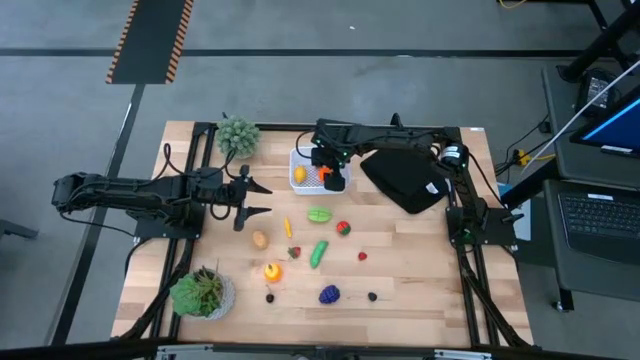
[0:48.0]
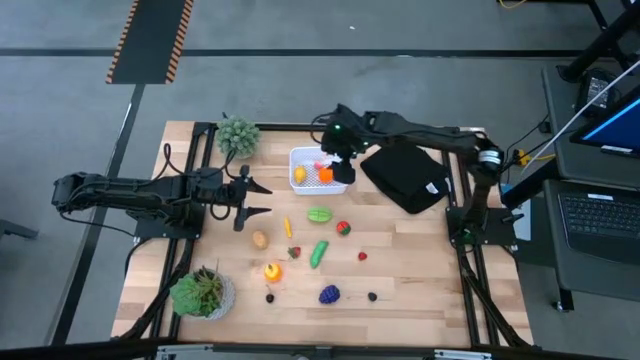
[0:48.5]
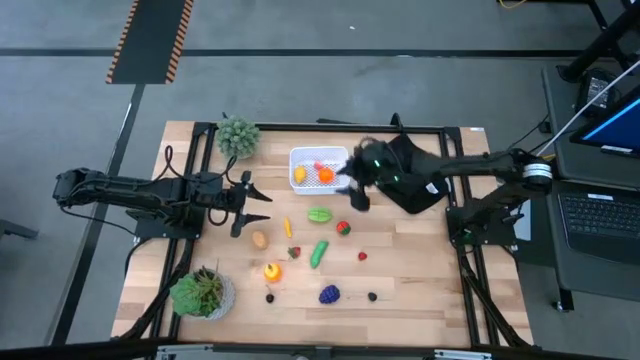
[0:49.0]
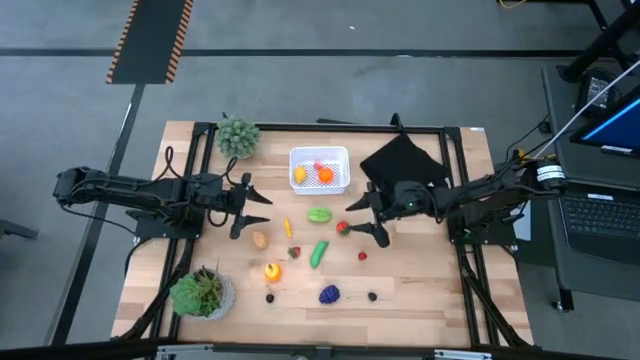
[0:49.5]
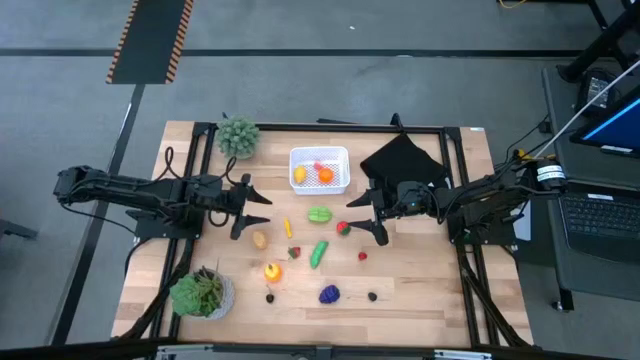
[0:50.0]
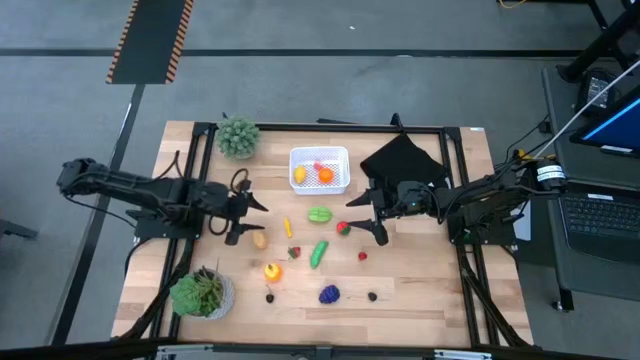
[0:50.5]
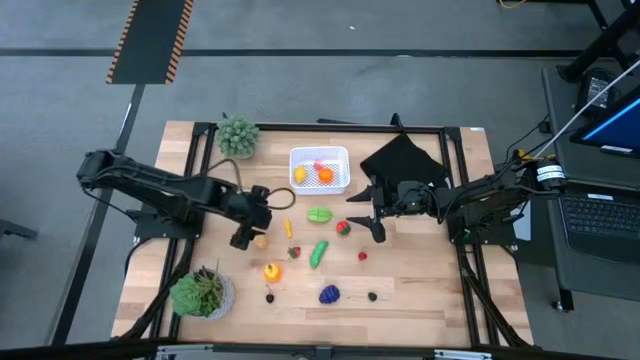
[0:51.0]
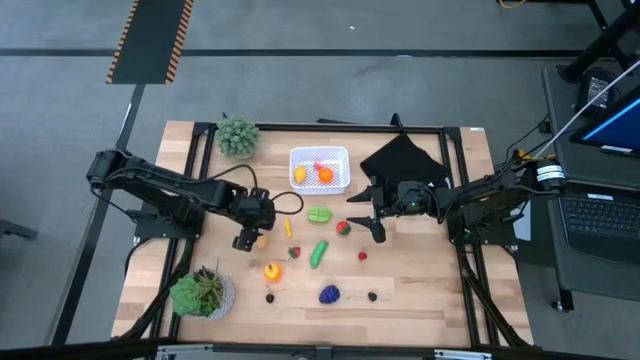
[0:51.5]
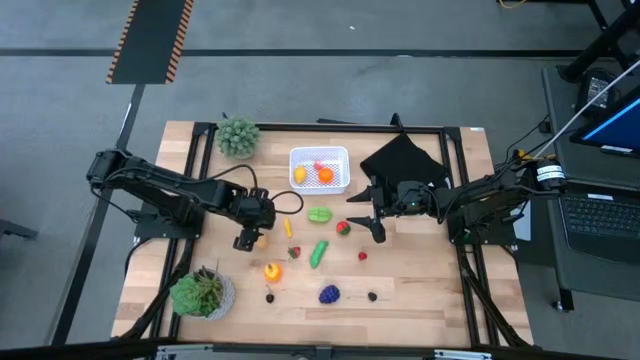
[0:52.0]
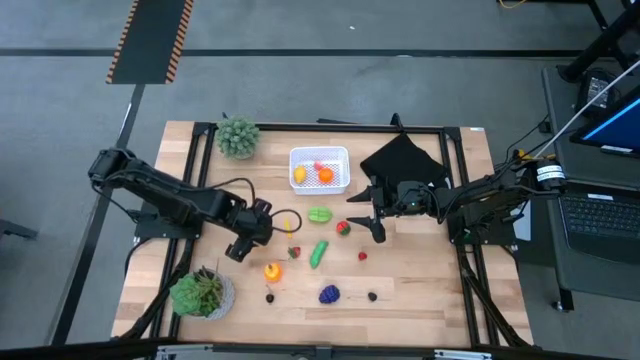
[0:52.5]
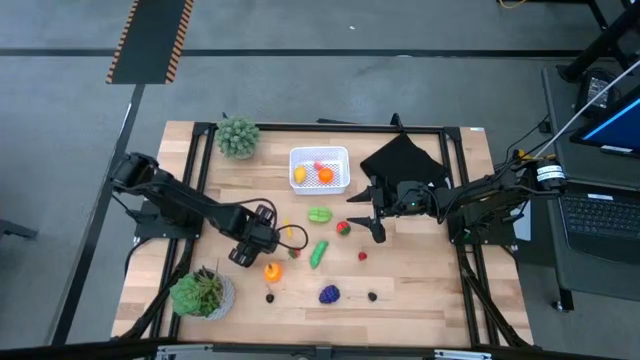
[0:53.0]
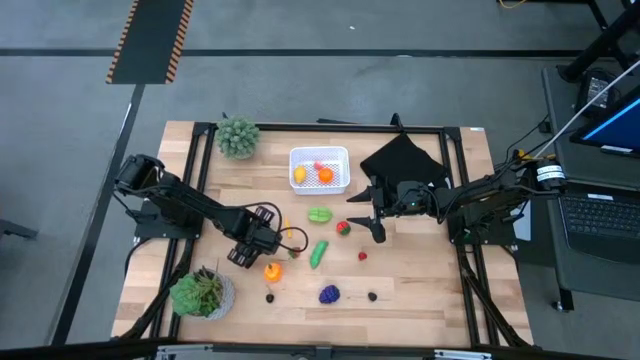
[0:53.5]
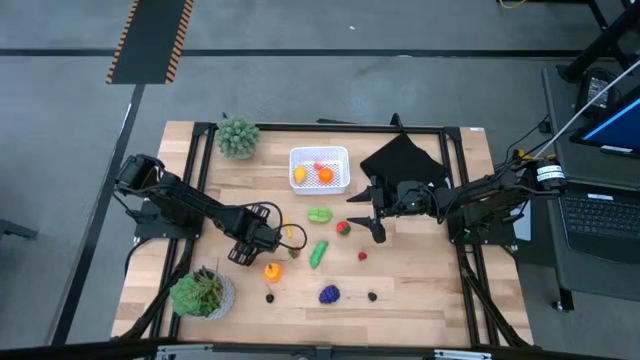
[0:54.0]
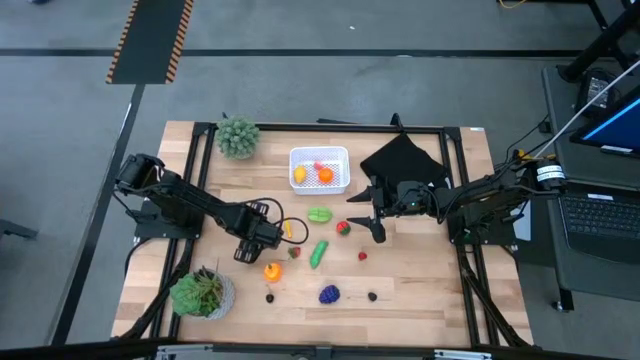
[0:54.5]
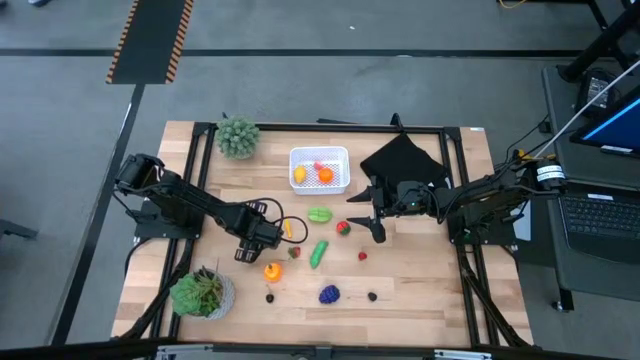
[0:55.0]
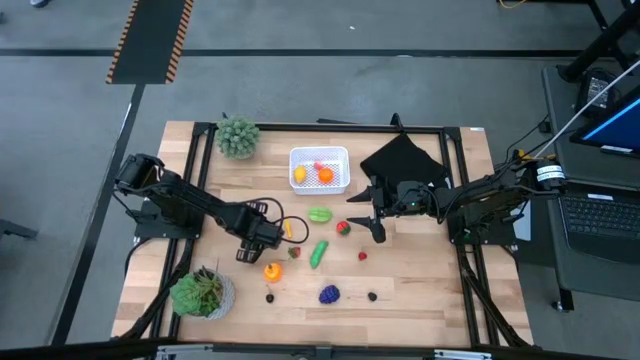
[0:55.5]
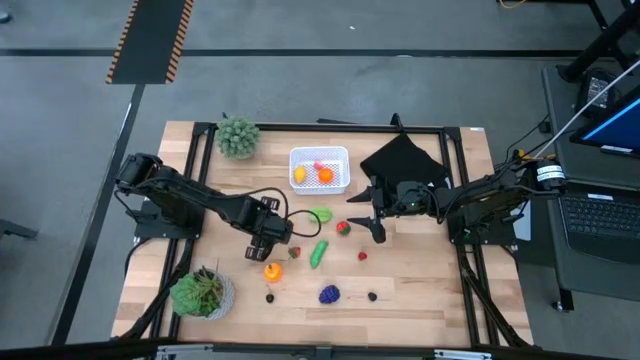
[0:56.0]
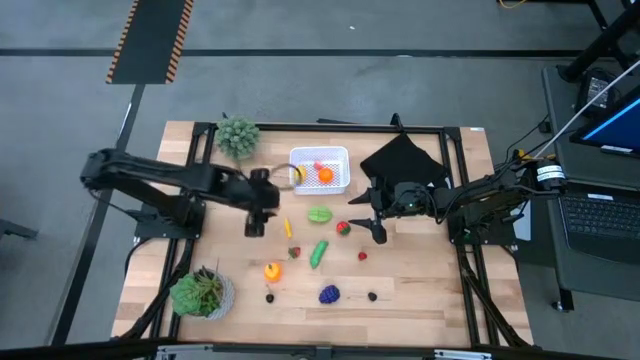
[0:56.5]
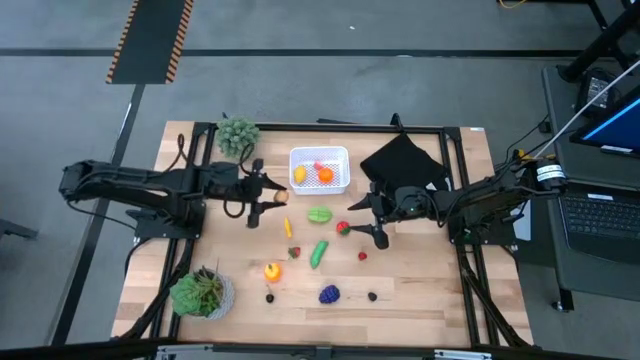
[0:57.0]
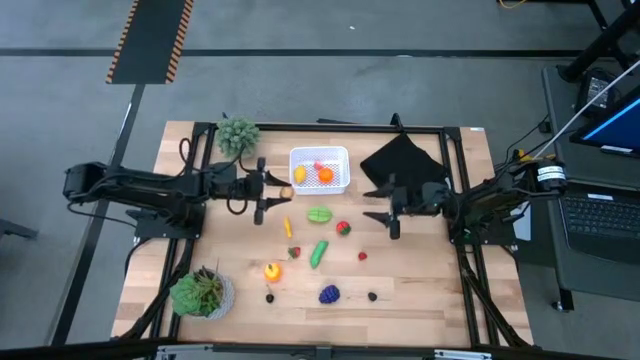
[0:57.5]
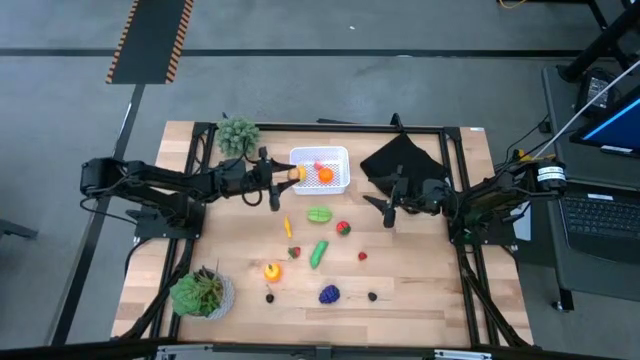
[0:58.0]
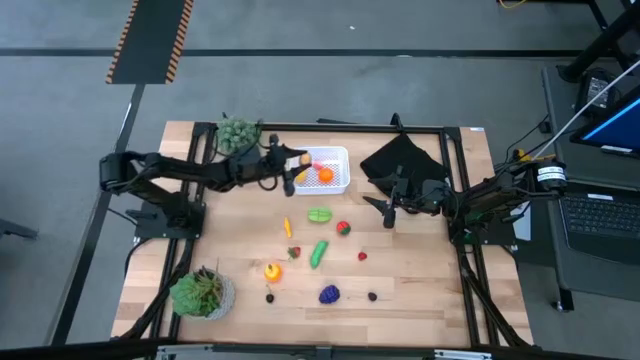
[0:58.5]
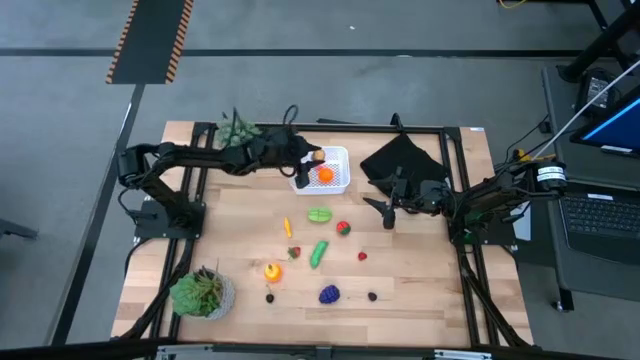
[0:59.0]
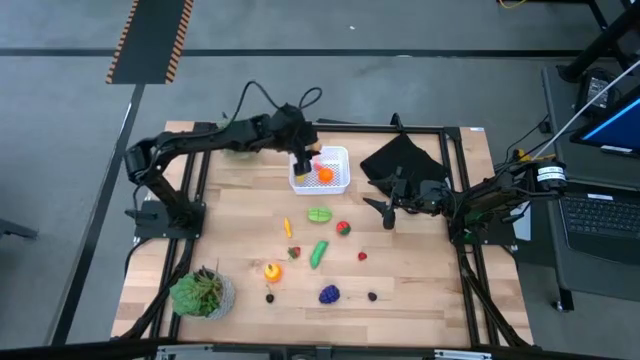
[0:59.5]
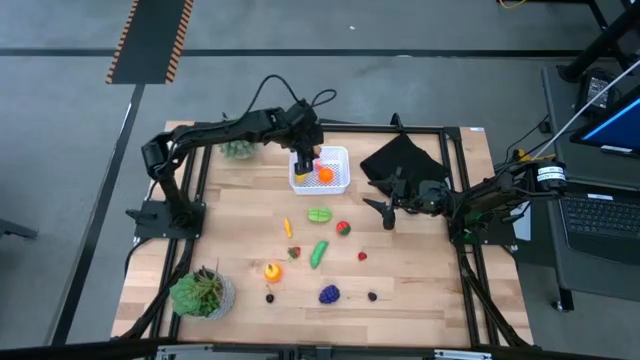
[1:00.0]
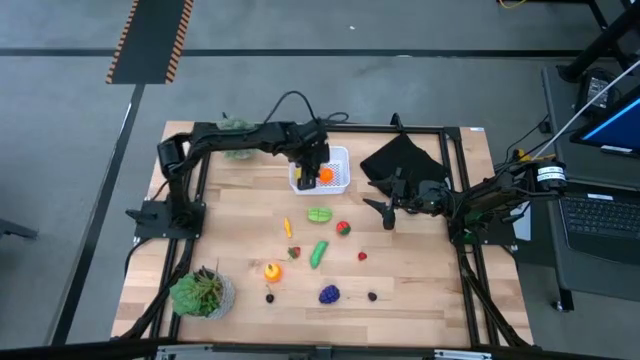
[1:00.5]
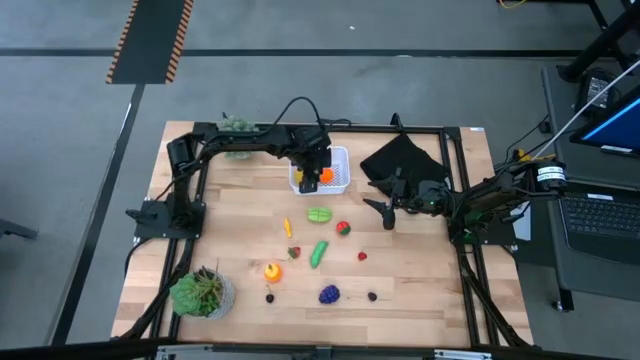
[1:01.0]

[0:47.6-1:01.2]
Task: Pick and placing Produce into tupperware
Put the potato into the white bin

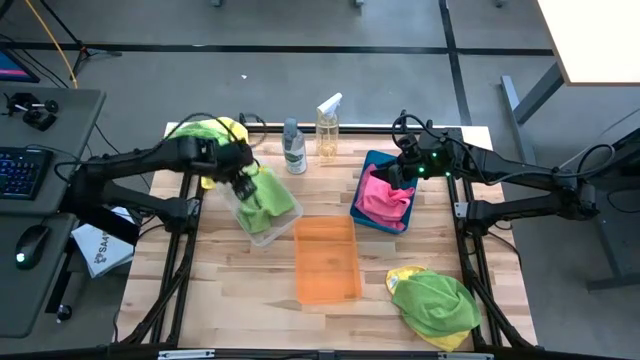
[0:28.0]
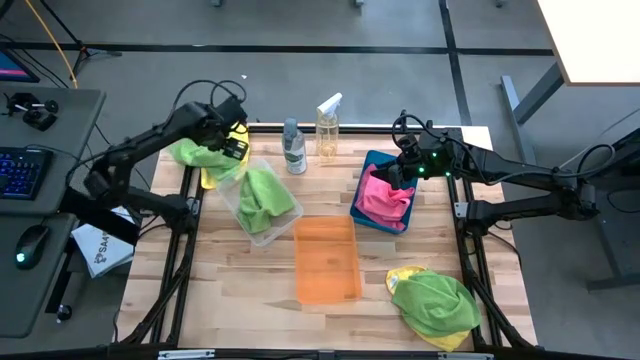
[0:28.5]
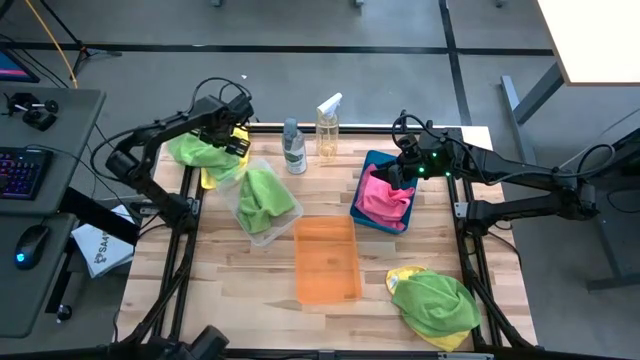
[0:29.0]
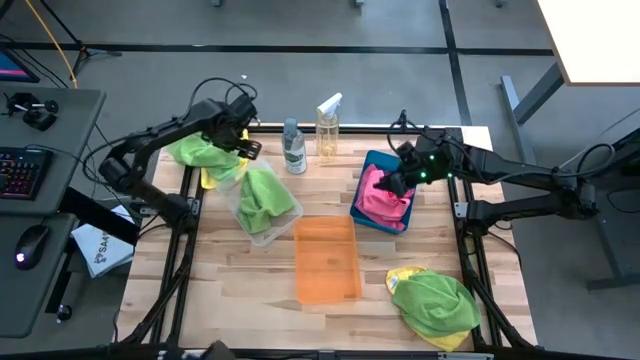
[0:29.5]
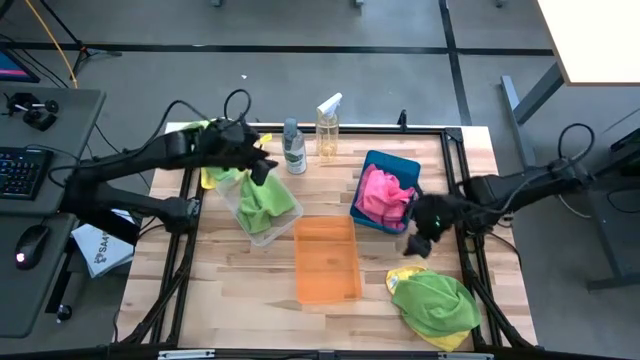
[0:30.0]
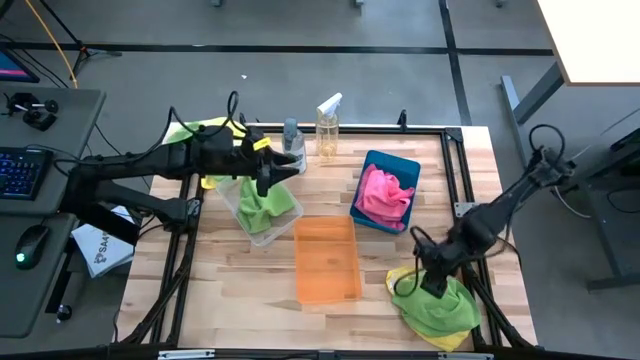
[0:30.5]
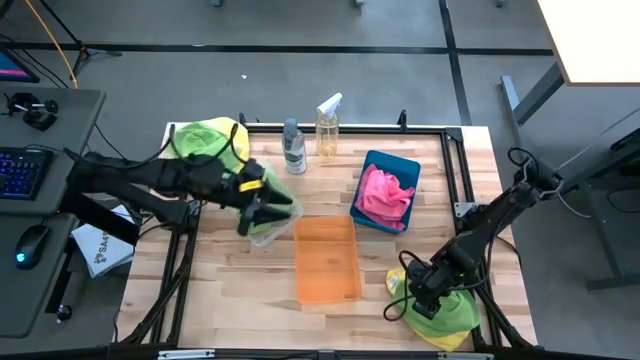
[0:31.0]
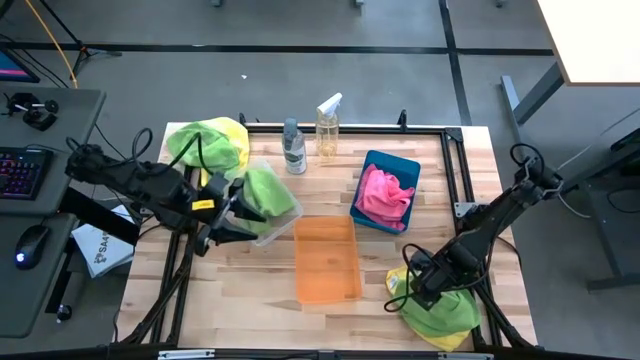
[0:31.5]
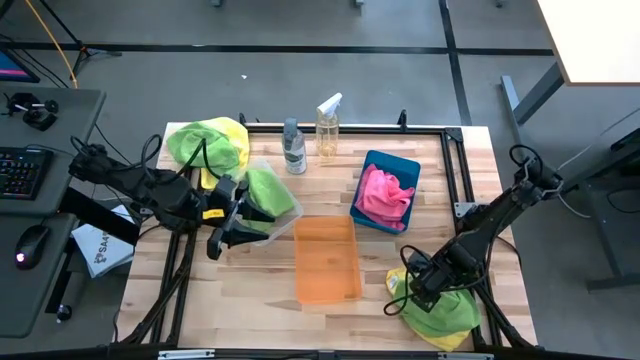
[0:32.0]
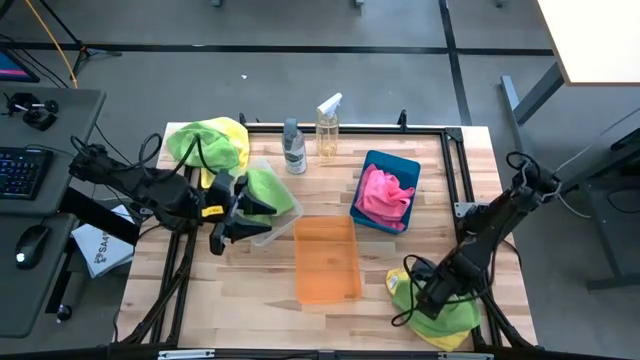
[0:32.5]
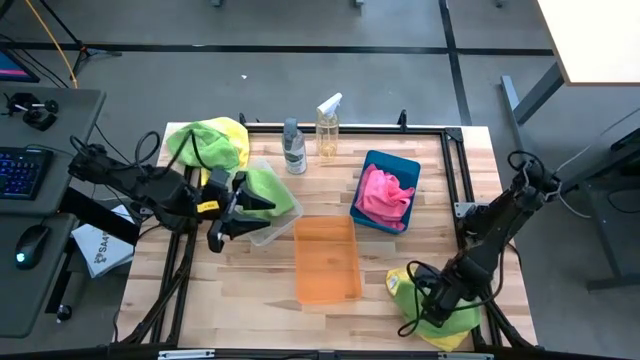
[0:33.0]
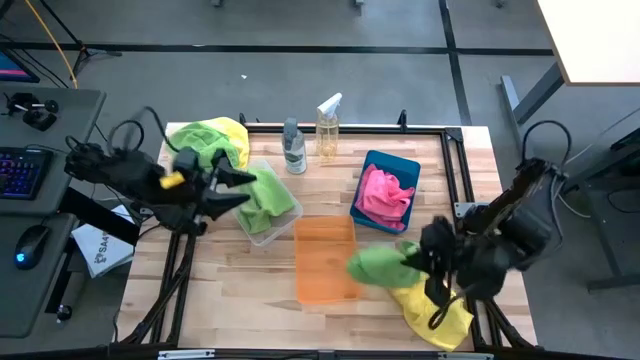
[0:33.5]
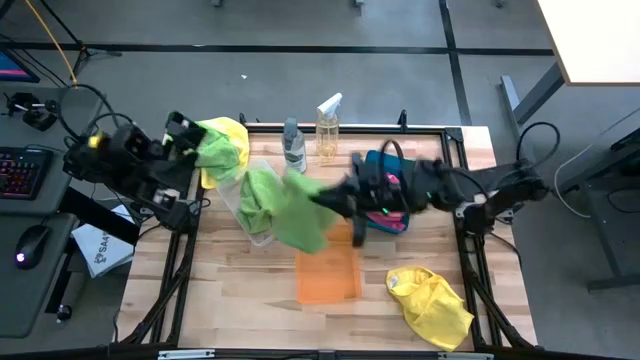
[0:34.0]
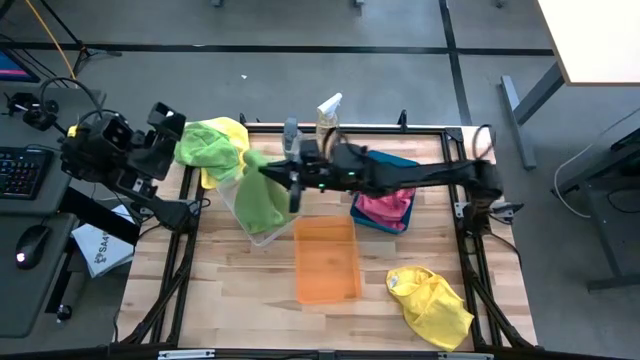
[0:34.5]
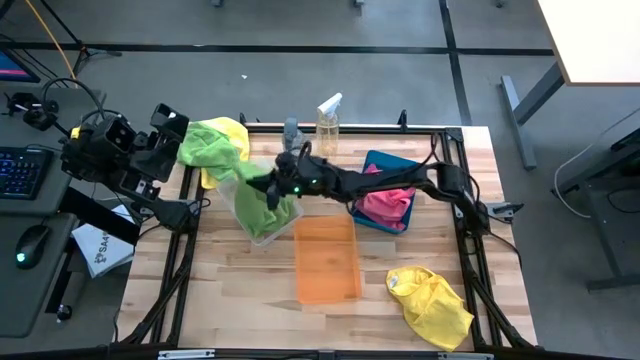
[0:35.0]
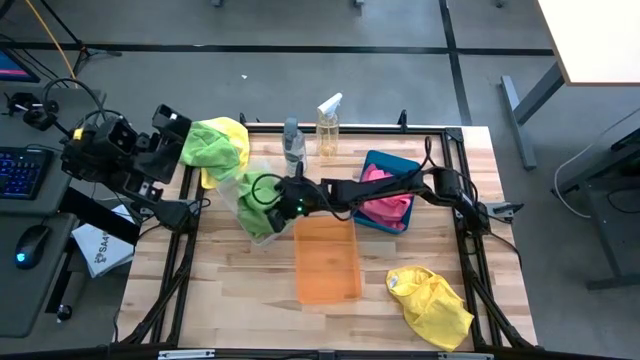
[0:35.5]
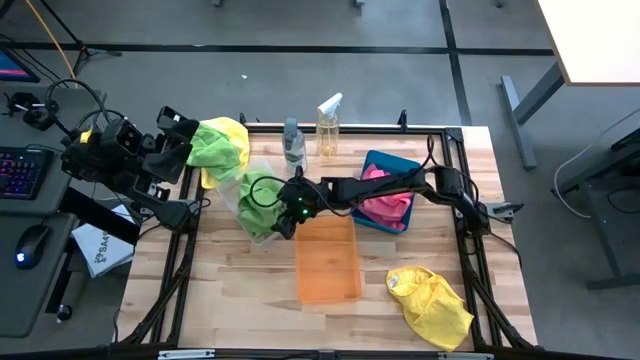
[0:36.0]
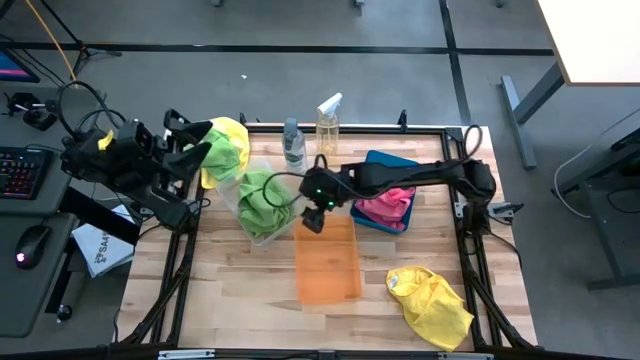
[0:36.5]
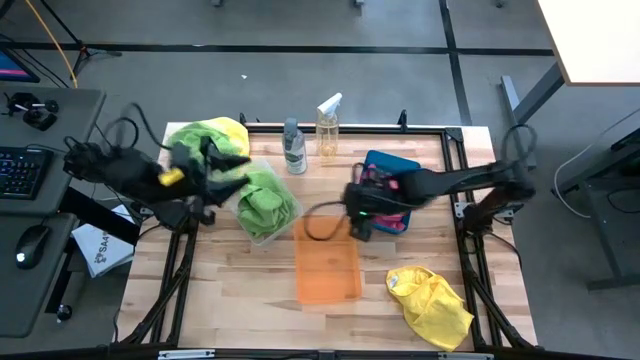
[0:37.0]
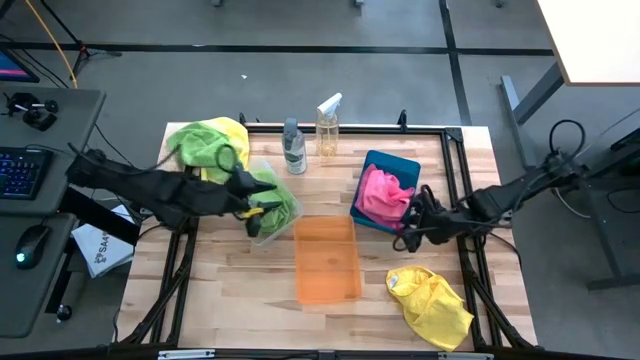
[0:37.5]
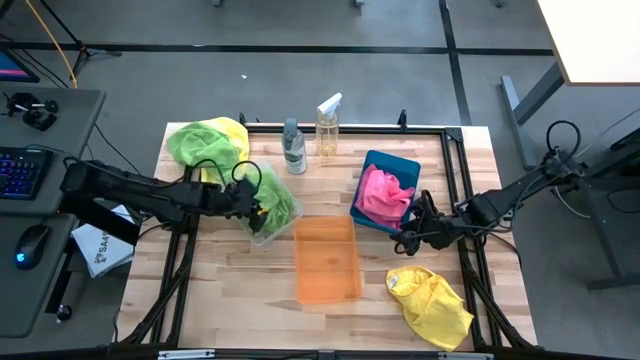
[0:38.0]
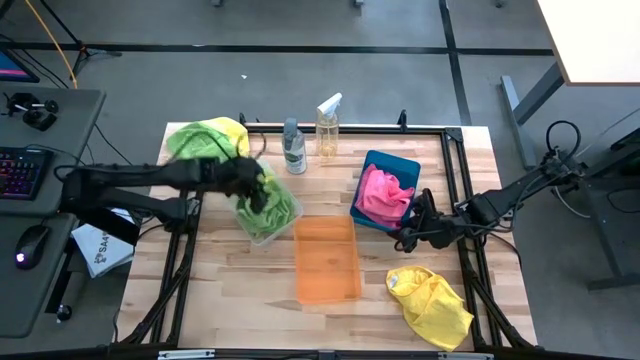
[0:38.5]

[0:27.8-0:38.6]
Task: Sort microfiber towel by color & place in baskets
Put the green microfiber towel into the transparent bin
